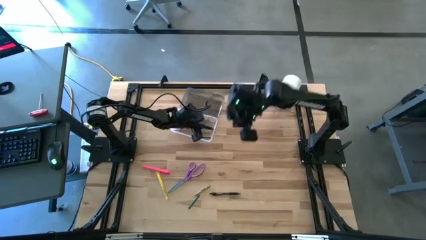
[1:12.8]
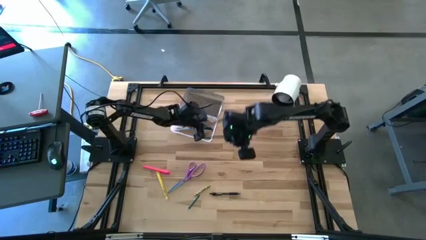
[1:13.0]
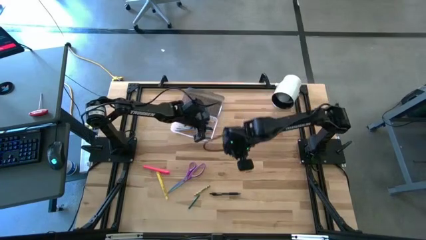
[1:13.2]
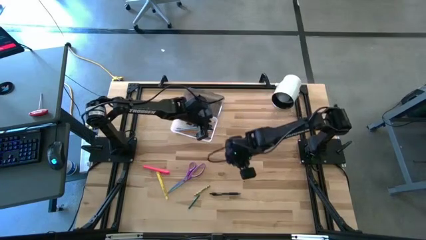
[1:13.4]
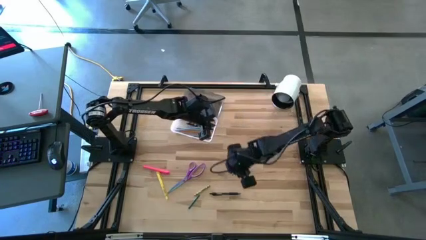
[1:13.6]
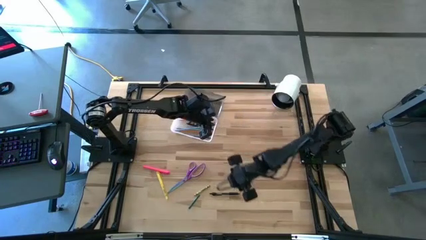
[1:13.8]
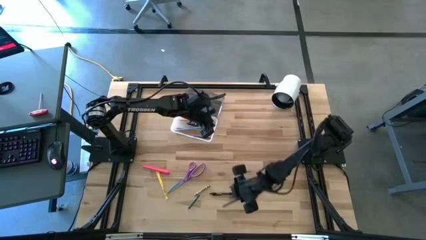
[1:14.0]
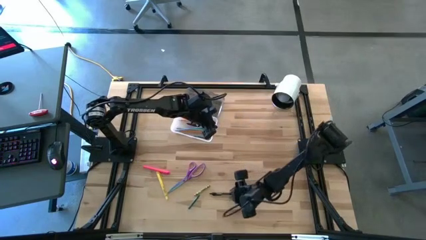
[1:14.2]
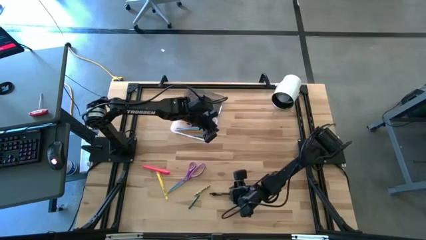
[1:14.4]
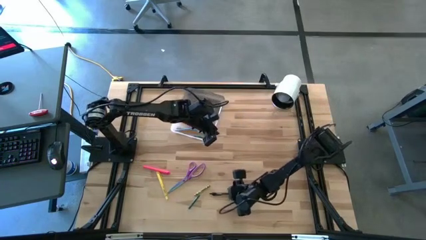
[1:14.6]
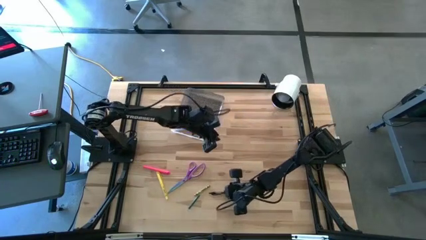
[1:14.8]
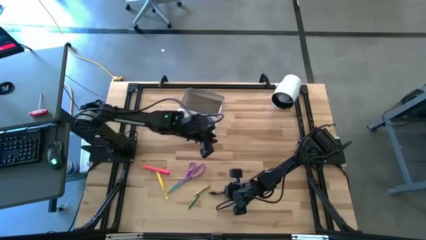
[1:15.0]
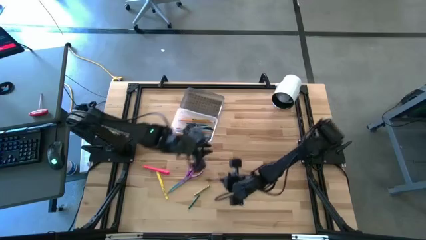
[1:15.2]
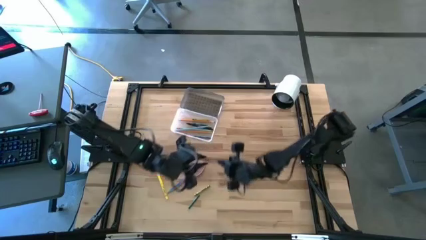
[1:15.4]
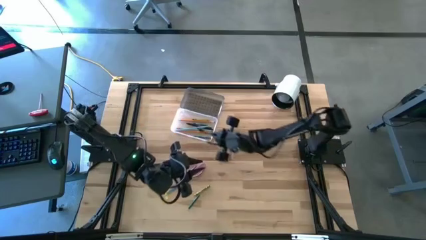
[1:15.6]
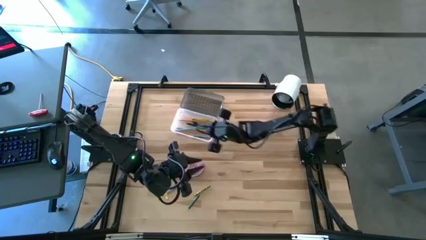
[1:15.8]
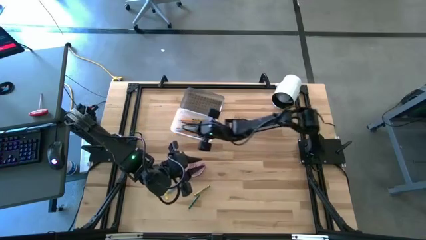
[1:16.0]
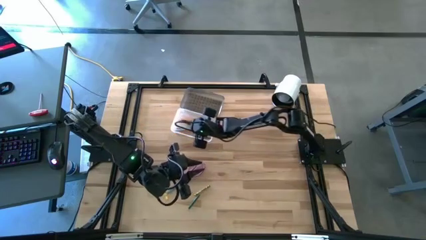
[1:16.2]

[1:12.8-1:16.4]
Task: Pick & place school supplies into a supply box
Put the black pen into the black supply box

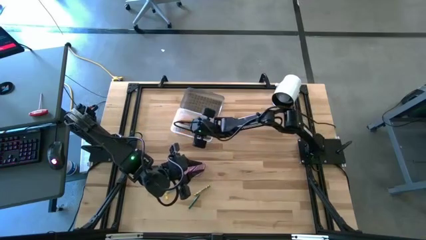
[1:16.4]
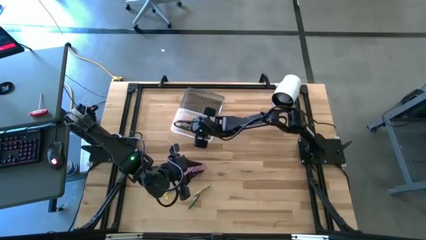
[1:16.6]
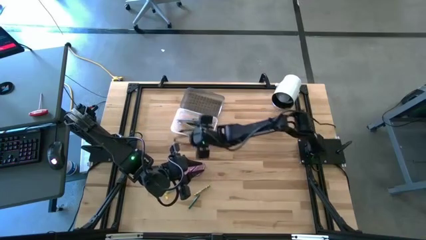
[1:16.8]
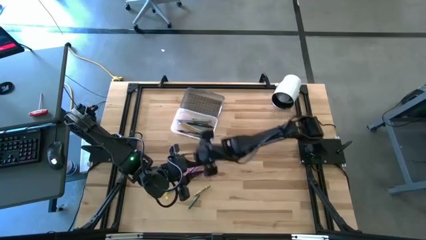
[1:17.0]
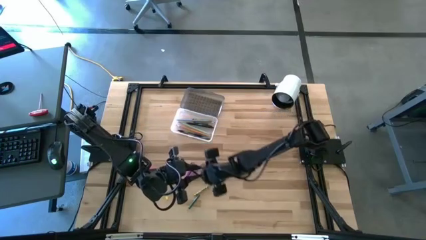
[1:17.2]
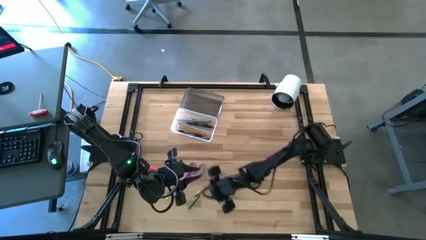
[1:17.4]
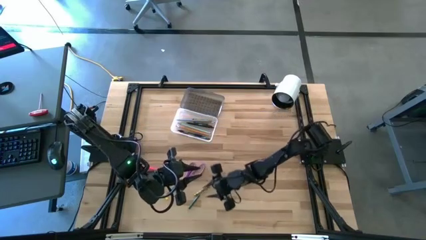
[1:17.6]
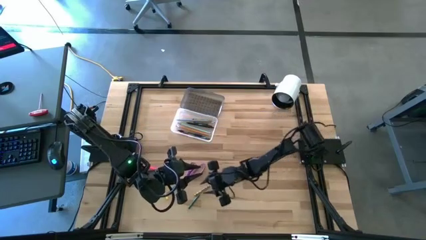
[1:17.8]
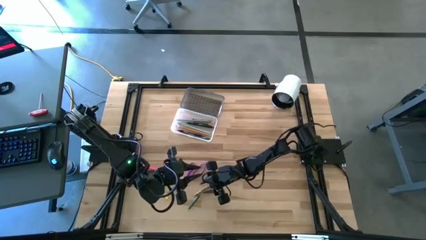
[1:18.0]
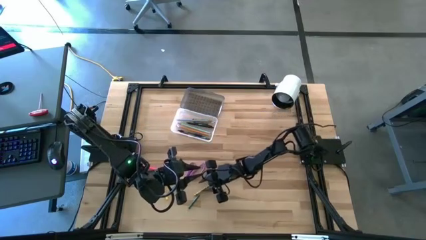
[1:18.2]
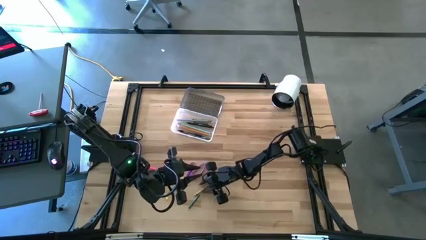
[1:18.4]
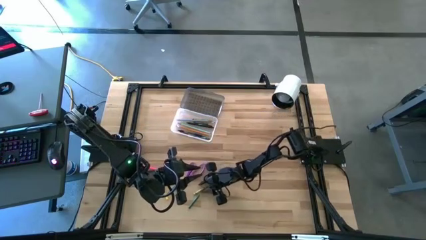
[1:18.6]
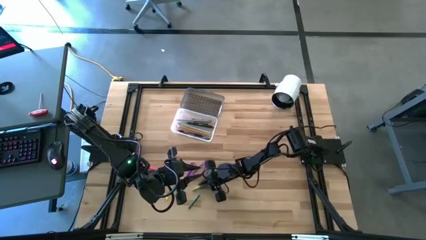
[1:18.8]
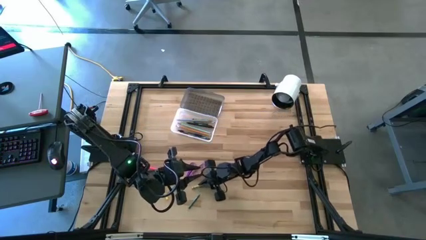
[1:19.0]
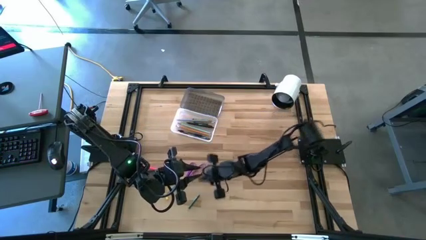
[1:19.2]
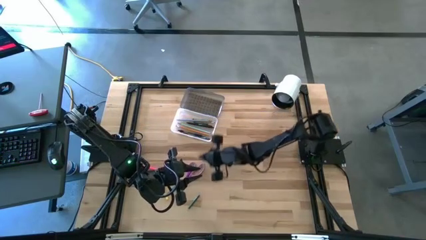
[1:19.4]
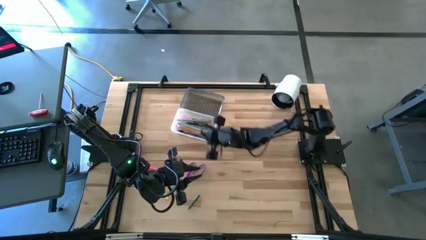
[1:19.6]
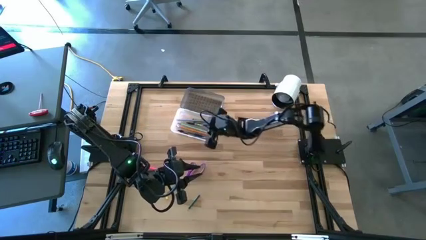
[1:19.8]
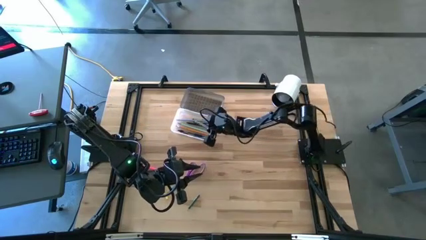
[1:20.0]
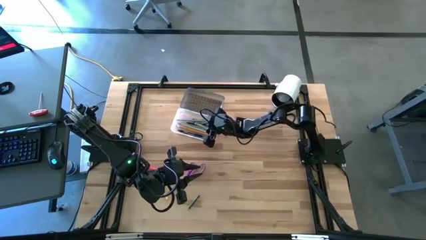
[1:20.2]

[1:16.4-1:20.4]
Put the green crayon into the black supply box

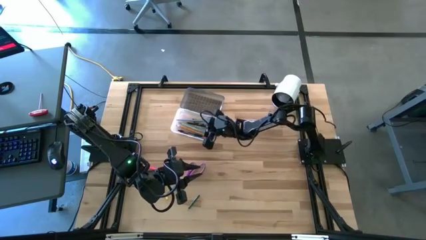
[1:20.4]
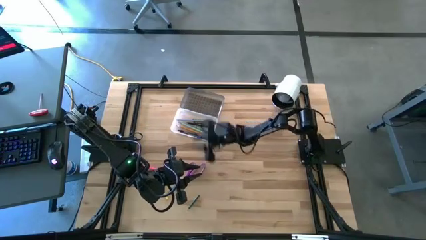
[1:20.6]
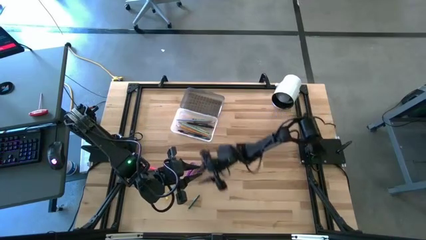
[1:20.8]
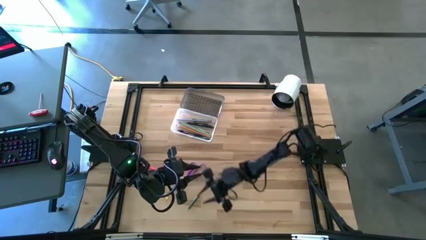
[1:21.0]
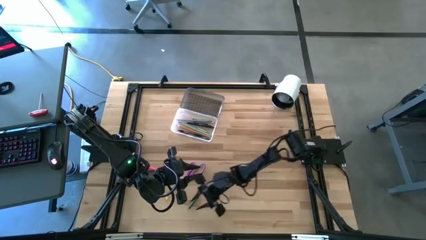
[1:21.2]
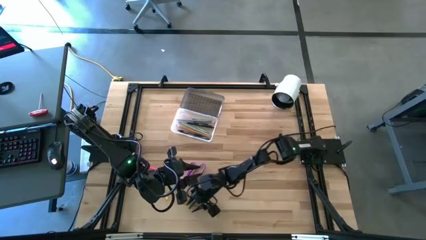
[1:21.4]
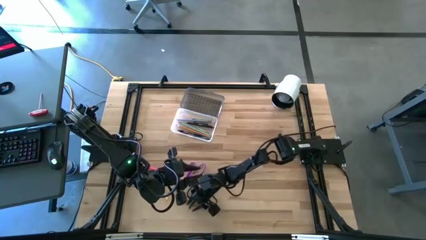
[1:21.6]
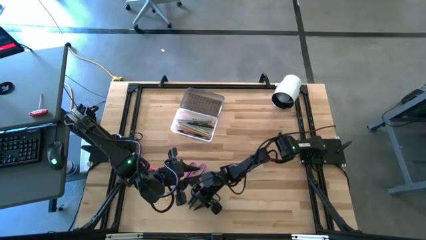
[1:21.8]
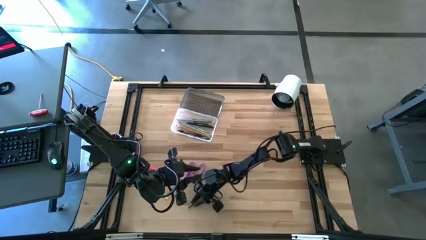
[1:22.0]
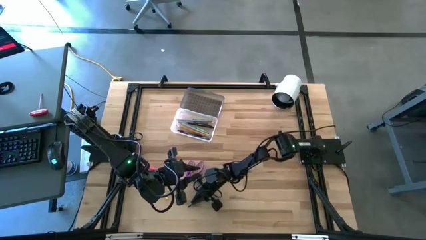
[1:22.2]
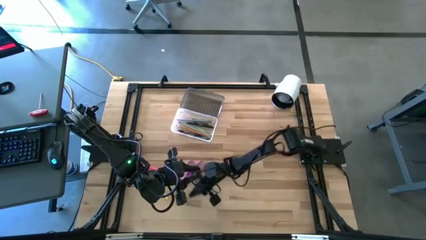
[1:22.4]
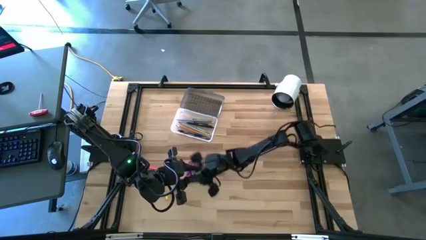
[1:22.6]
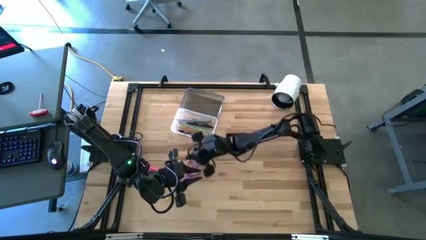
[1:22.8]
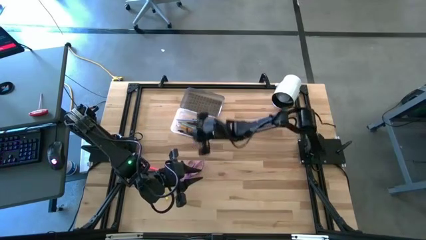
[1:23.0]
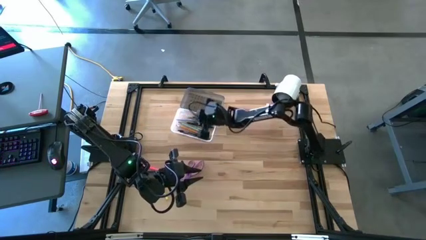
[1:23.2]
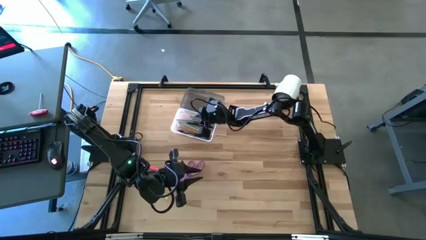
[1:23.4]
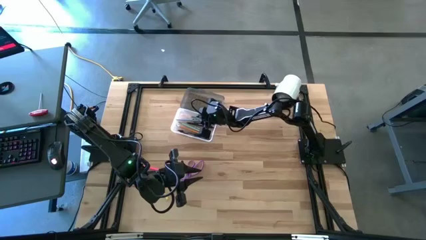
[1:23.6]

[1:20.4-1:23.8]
Put the green crayon into the black supply box

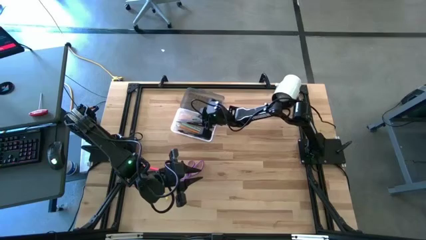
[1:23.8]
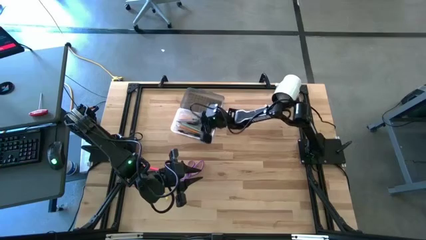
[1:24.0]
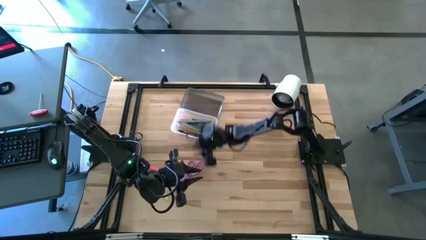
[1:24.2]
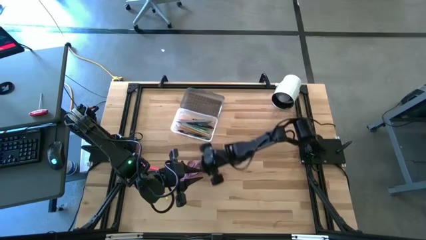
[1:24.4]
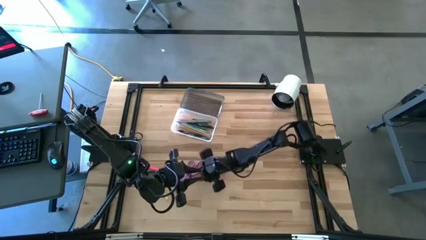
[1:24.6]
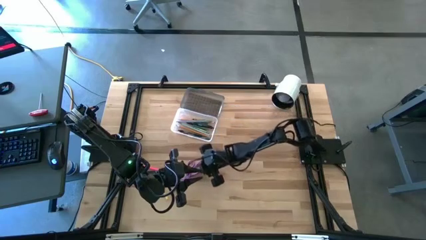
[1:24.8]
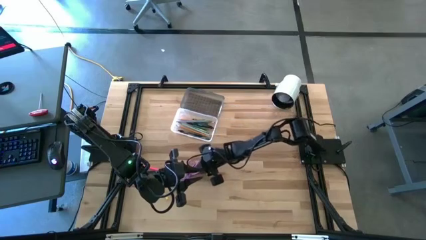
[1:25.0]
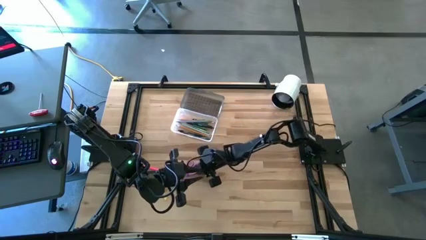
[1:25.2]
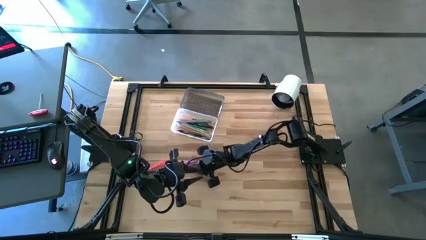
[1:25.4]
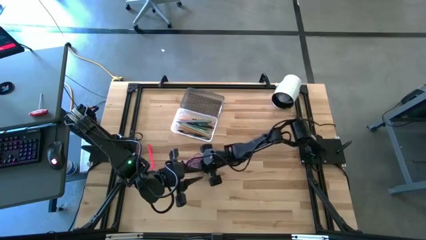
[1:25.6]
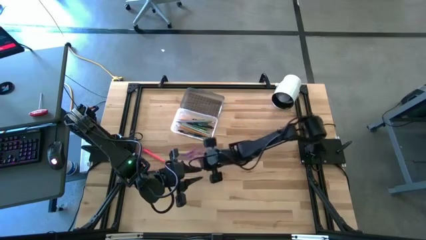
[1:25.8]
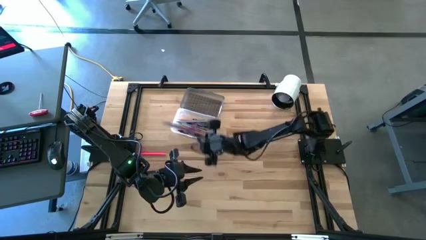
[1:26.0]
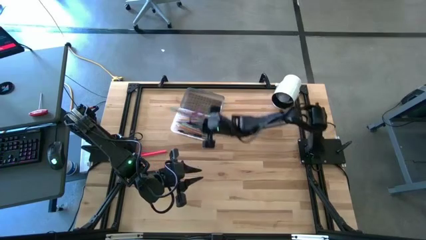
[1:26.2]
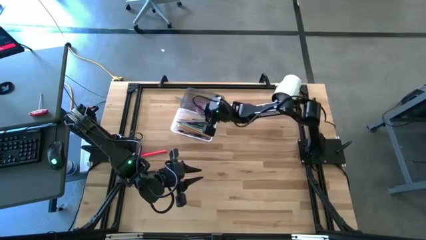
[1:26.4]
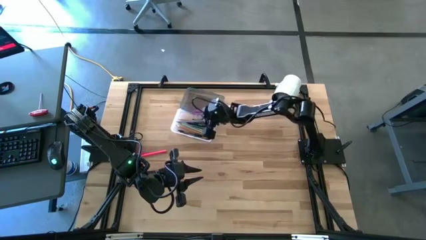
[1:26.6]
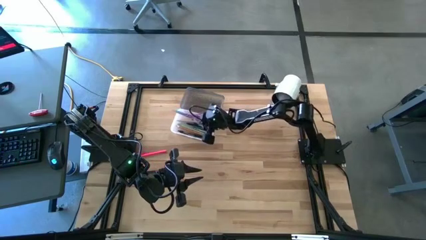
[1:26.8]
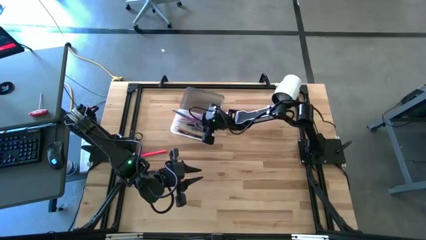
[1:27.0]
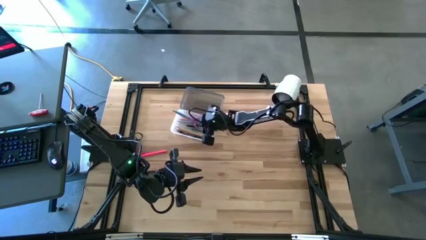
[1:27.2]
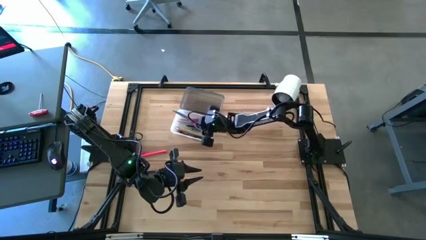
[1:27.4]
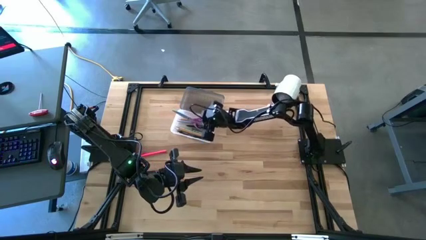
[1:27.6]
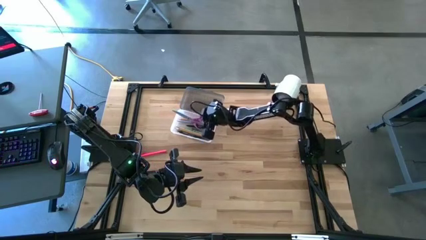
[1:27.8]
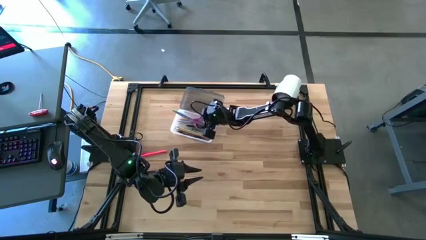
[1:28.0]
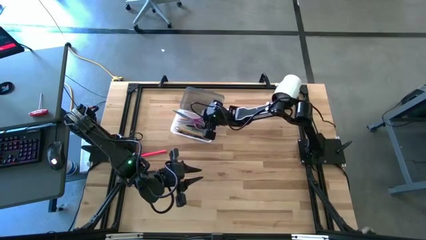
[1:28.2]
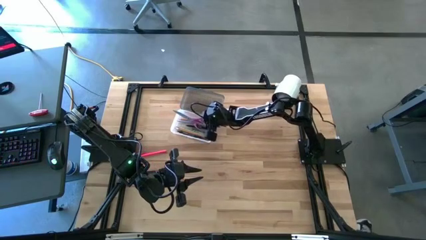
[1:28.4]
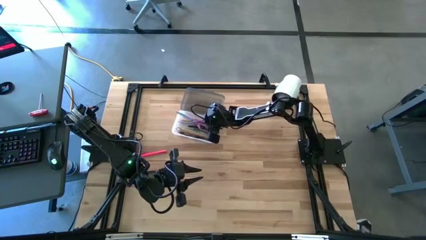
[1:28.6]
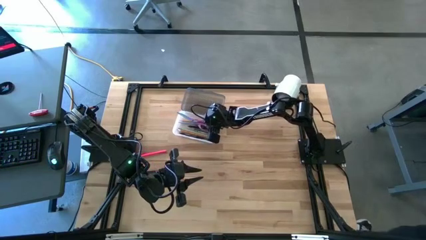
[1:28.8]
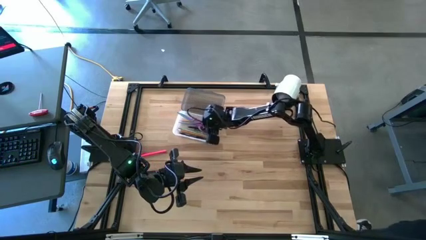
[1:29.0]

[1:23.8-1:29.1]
Put the purple scissors into the black supply box
